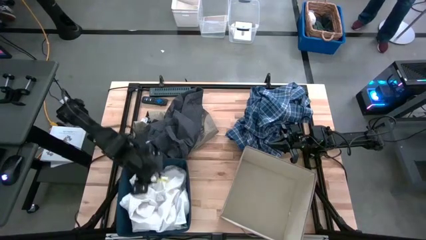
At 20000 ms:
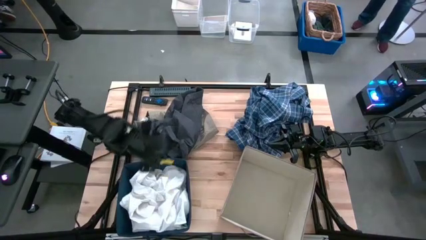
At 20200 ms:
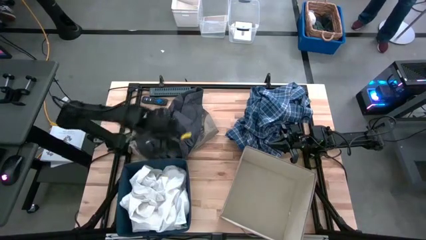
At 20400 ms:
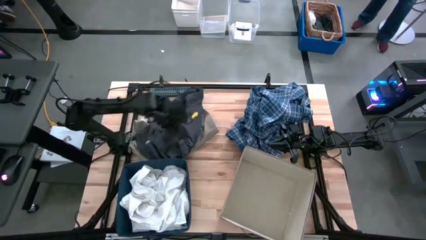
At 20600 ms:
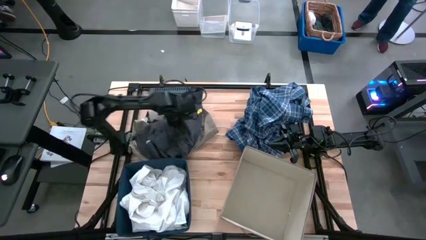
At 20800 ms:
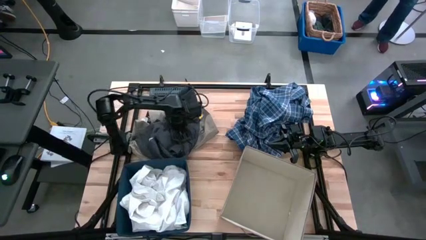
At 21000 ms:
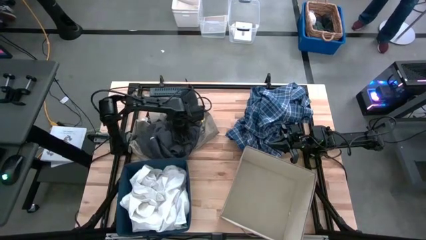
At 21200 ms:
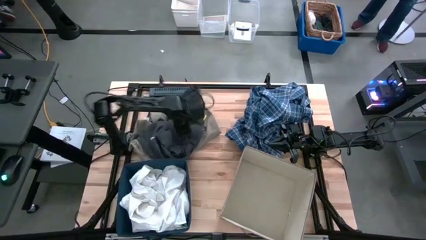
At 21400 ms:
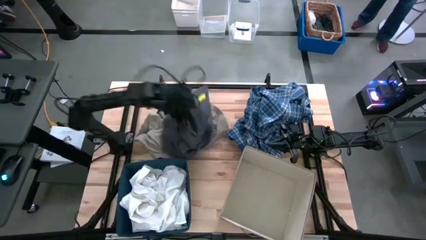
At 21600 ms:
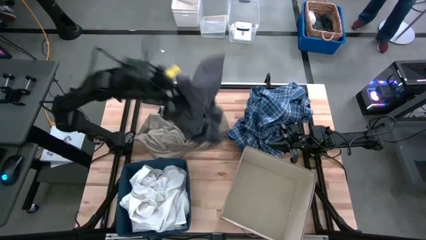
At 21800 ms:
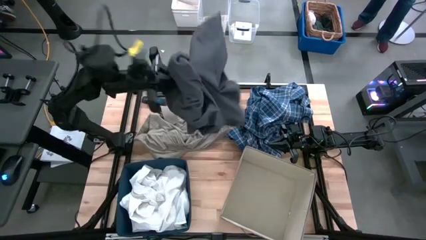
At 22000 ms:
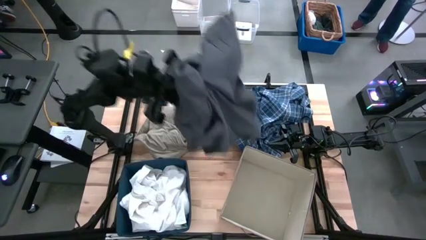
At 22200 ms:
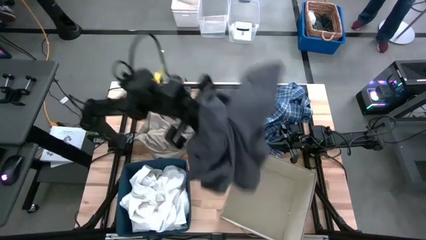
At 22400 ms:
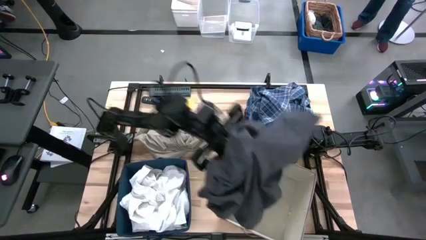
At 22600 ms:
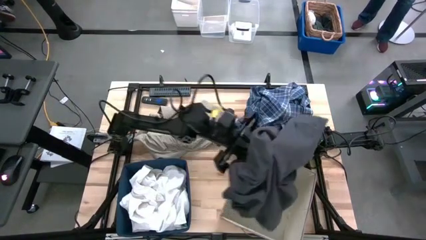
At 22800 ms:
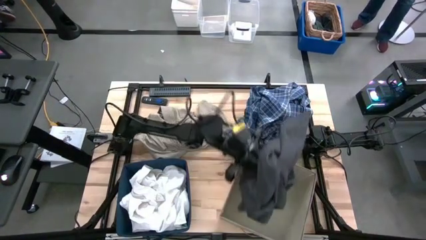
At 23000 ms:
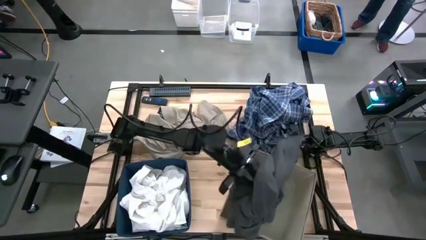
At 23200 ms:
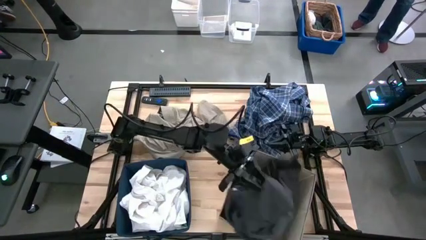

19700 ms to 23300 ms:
Task: Sort clothes
Put the gray shorts into the laundry organizer

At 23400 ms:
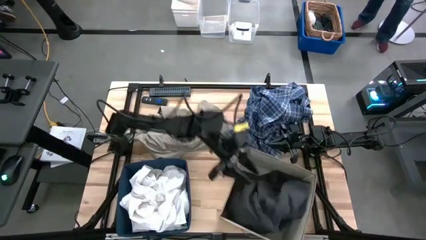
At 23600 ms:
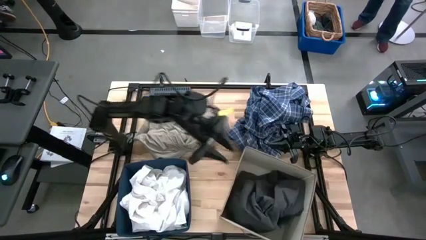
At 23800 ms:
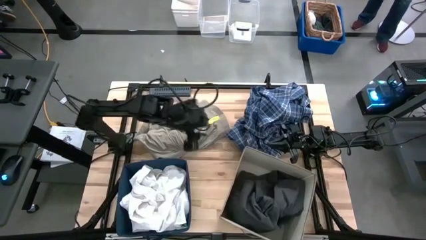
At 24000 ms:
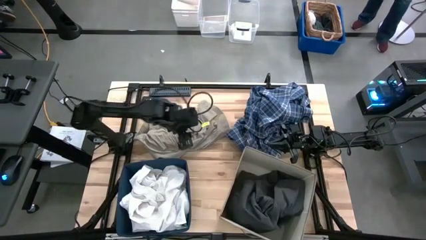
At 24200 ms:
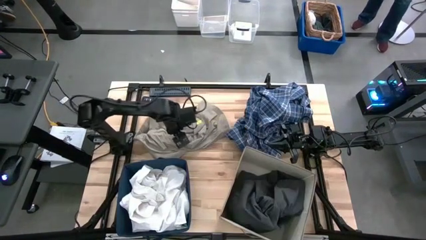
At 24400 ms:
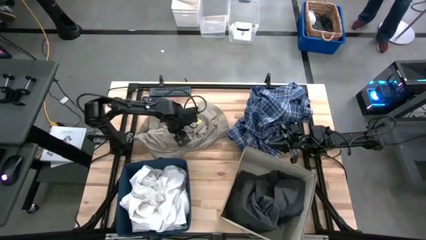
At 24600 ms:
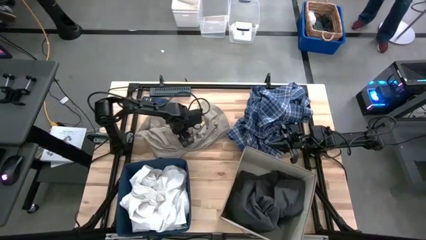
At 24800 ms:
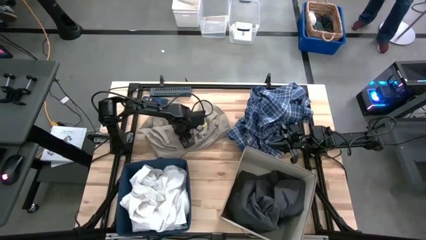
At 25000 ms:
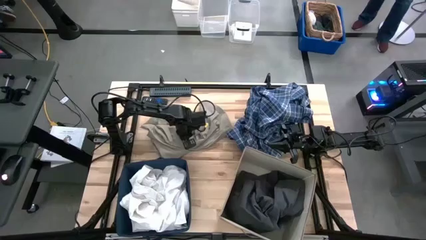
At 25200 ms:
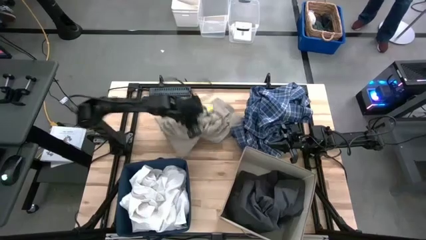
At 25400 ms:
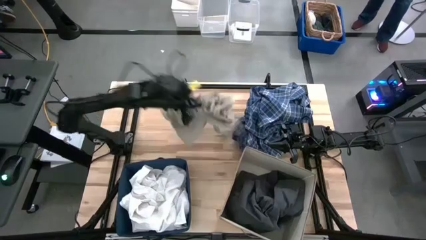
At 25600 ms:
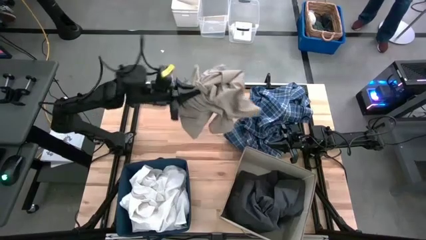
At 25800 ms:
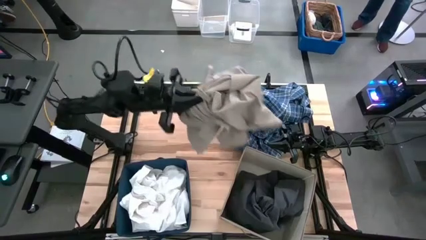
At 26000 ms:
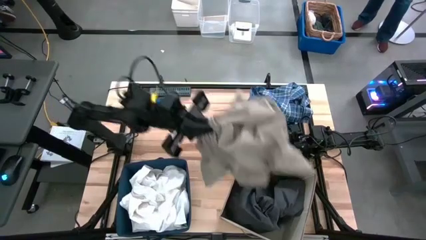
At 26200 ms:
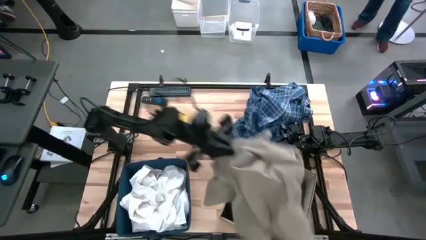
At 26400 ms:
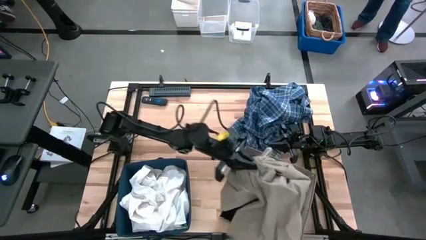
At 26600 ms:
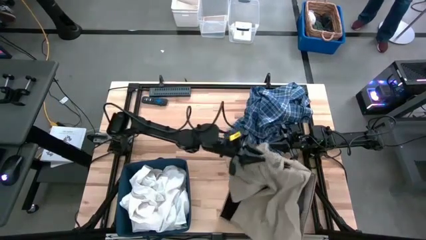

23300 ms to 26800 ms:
Put the brown shorts into the laundry organizer

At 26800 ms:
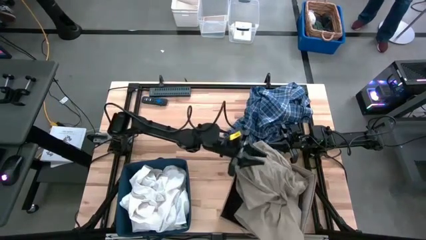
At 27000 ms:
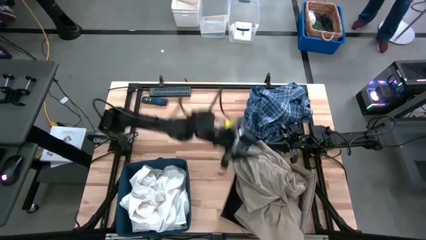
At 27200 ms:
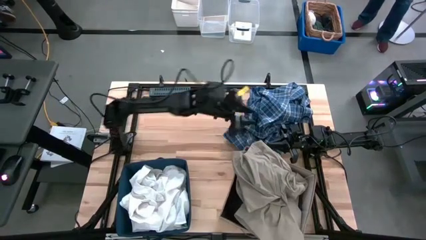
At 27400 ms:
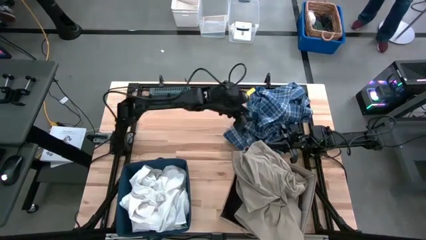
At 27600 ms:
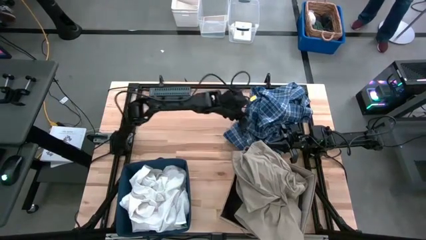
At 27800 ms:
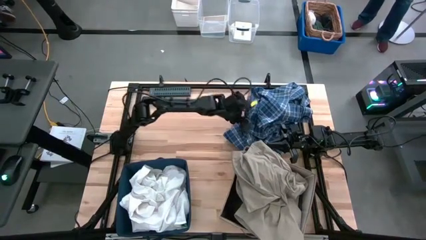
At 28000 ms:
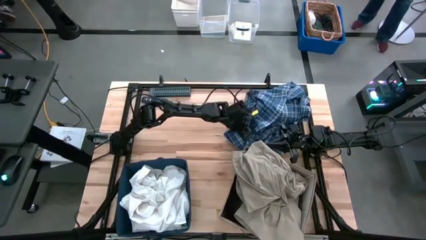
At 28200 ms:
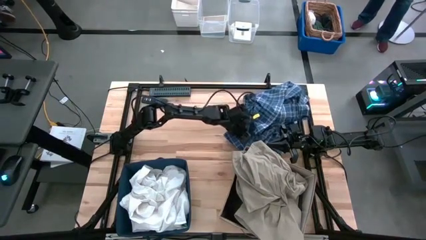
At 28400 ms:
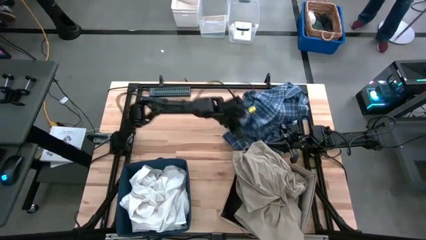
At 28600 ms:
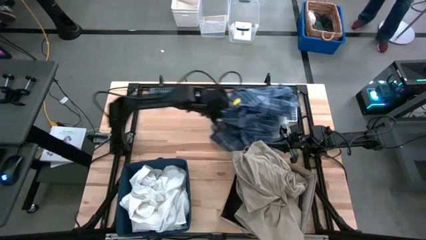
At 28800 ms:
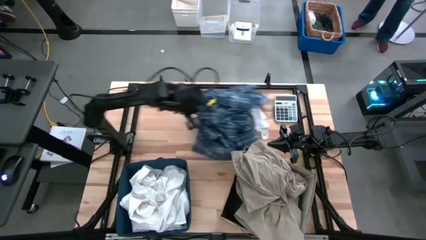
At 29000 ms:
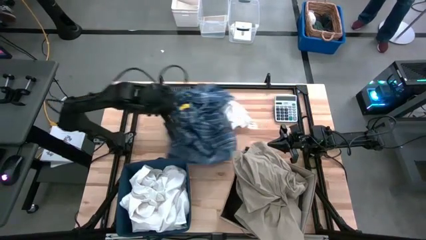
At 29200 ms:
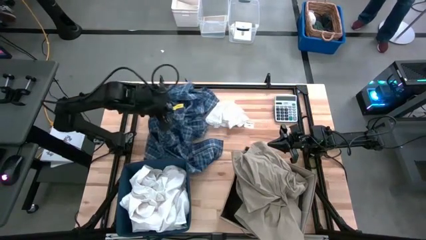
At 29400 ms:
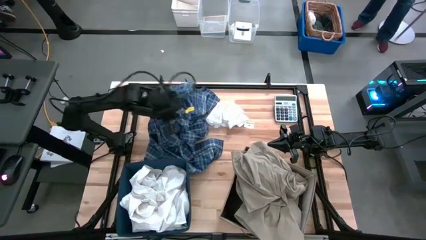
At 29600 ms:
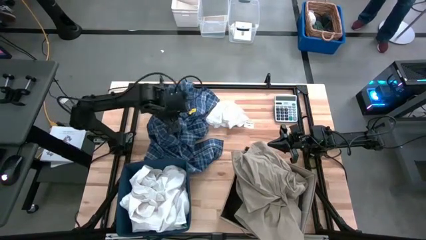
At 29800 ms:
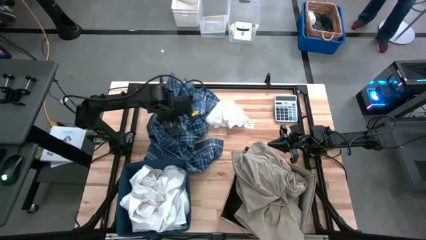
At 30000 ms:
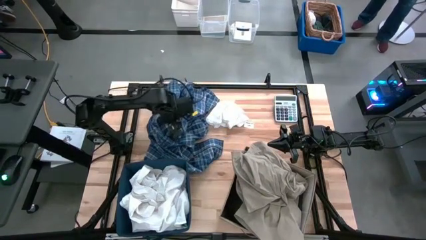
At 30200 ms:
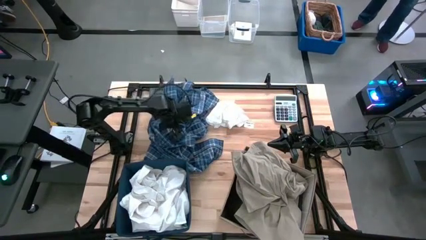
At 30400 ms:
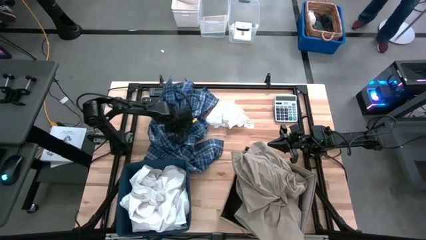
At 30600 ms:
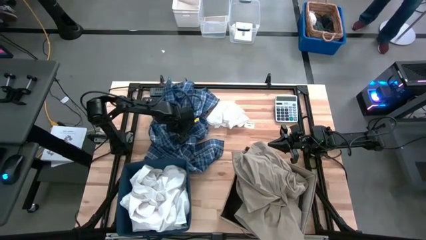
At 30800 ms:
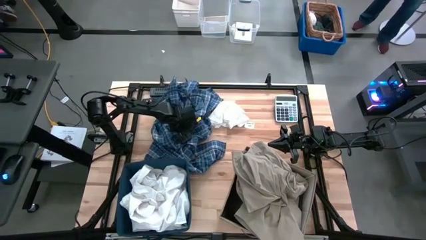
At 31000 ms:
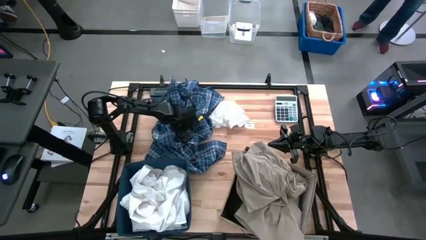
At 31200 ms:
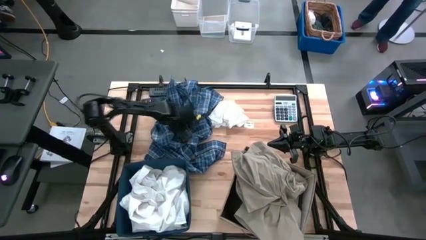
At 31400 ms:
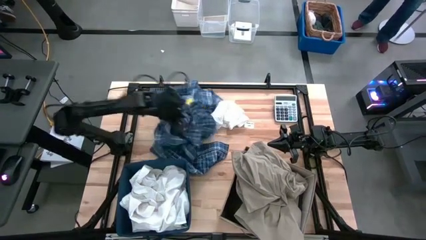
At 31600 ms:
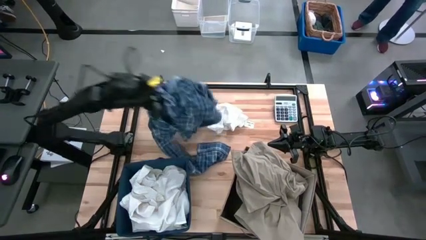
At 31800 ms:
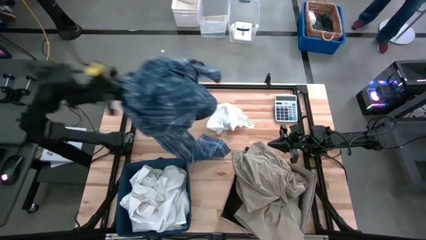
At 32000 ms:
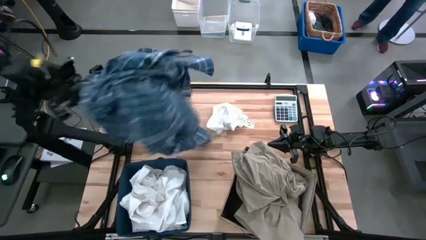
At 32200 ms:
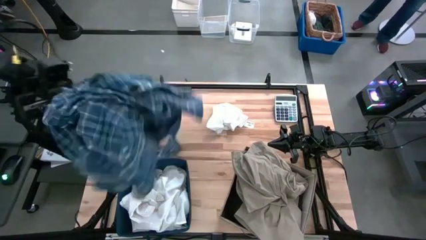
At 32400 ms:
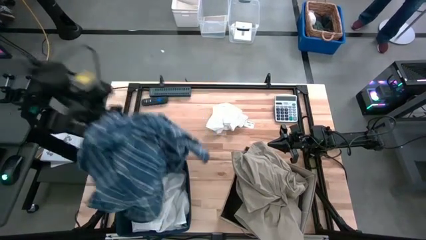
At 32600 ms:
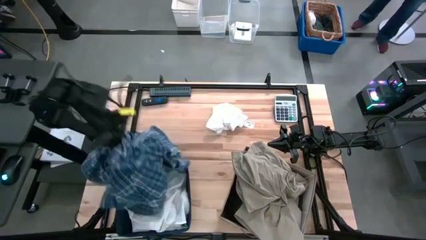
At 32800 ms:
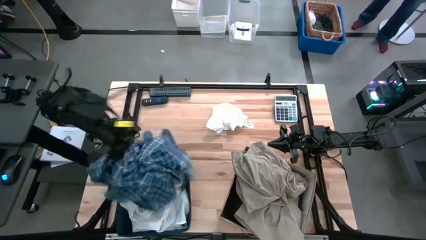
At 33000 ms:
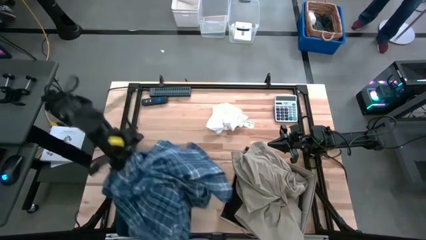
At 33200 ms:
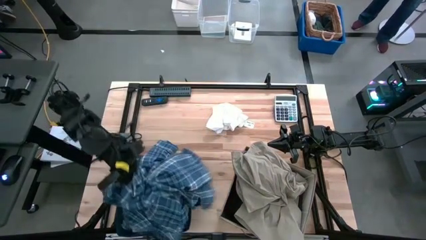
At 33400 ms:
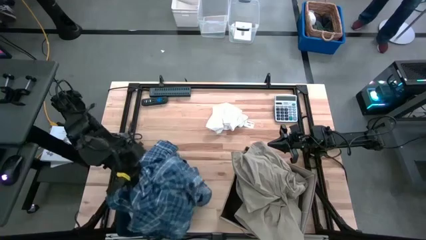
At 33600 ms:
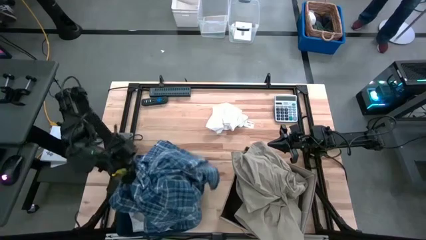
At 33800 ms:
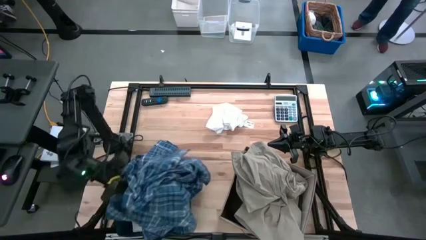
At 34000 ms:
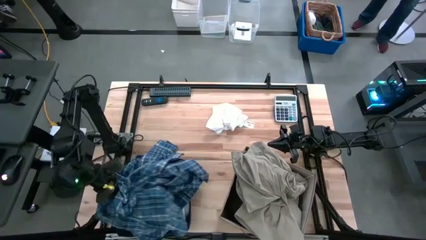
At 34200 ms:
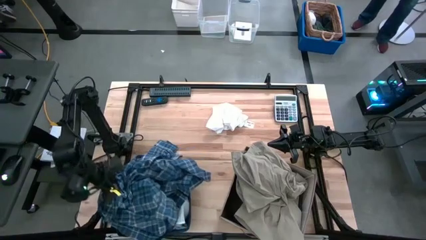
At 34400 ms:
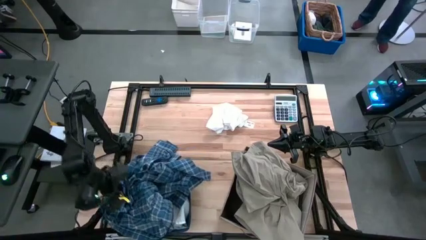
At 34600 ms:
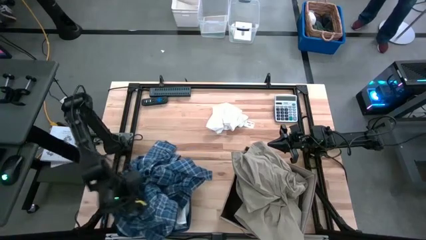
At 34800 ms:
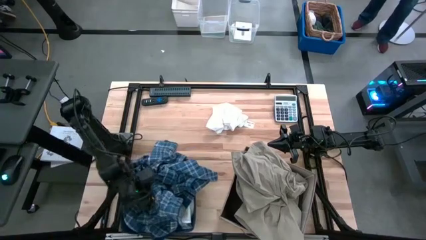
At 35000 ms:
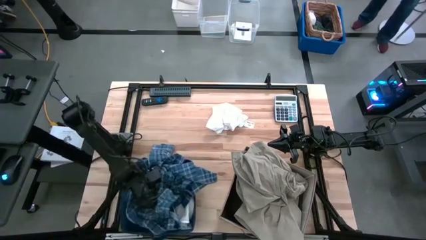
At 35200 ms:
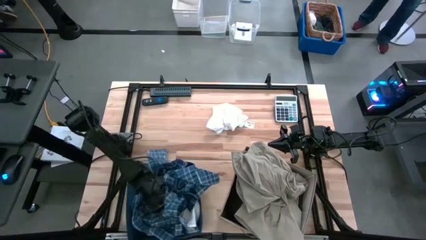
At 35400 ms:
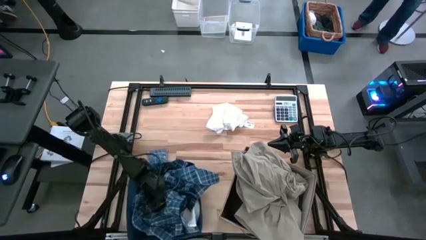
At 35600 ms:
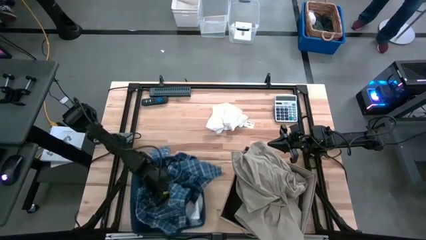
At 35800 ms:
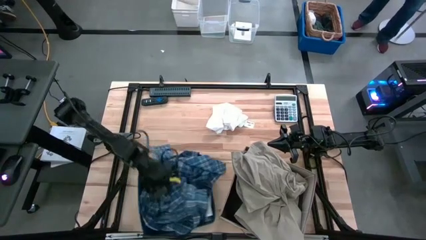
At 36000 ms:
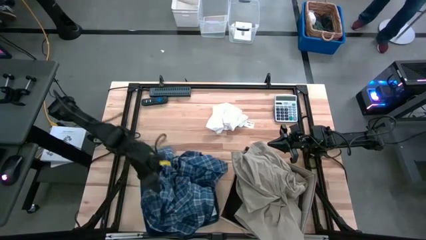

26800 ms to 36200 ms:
Put the blue checkered shirt into the blue bin
